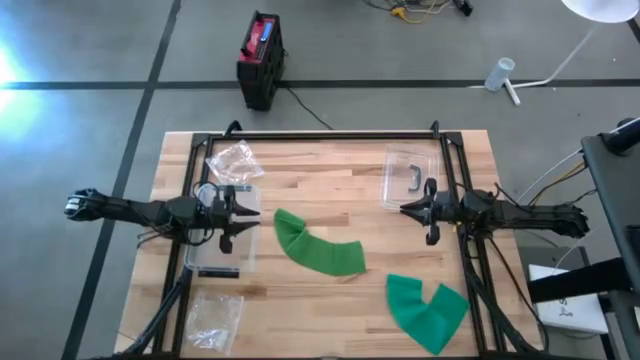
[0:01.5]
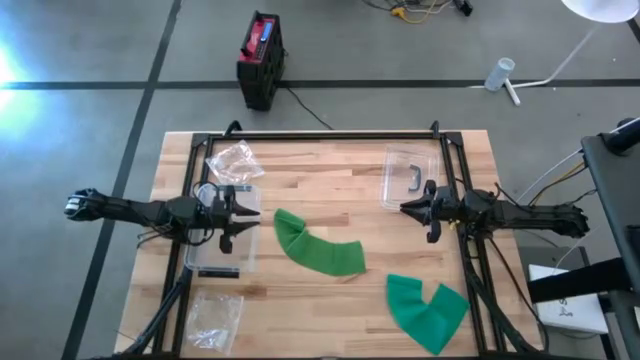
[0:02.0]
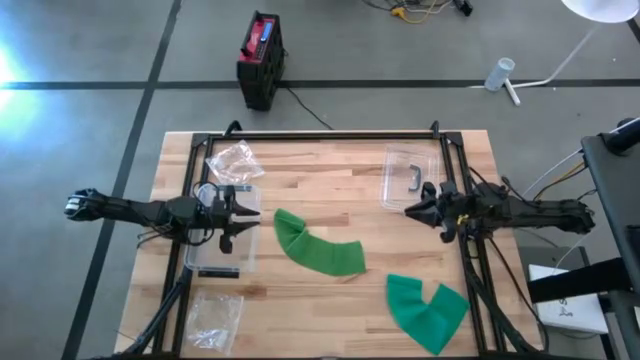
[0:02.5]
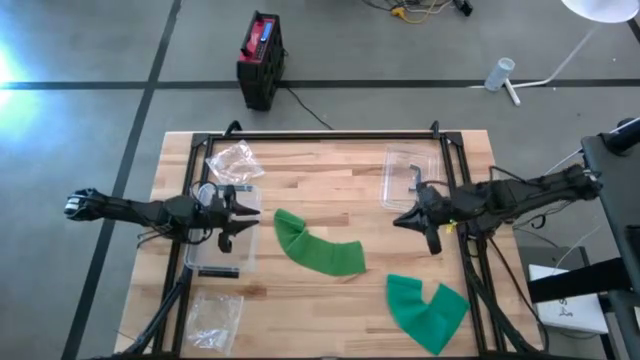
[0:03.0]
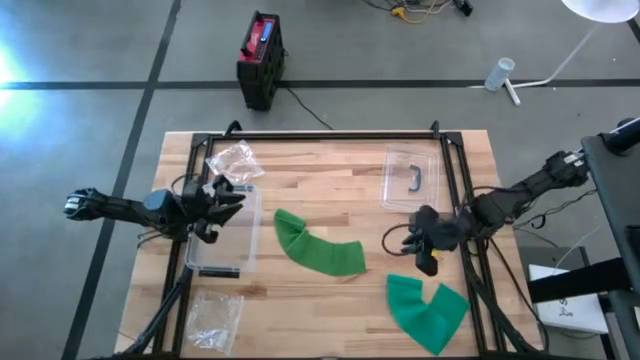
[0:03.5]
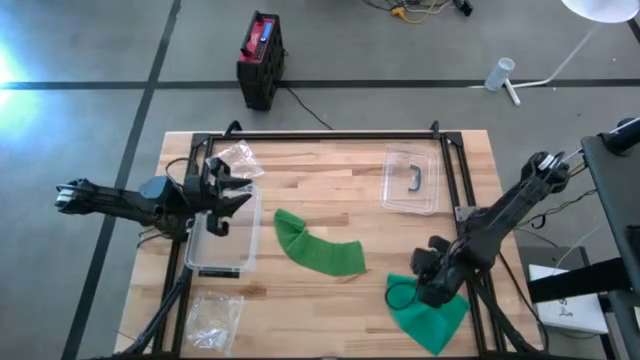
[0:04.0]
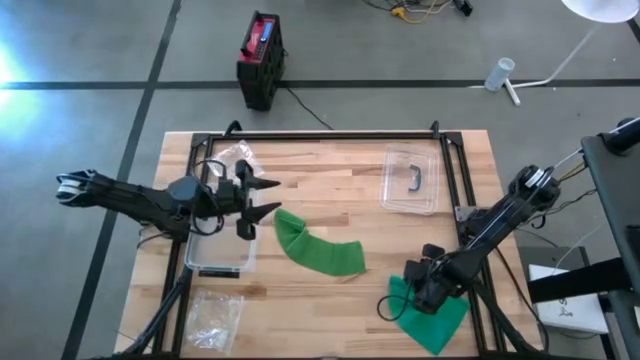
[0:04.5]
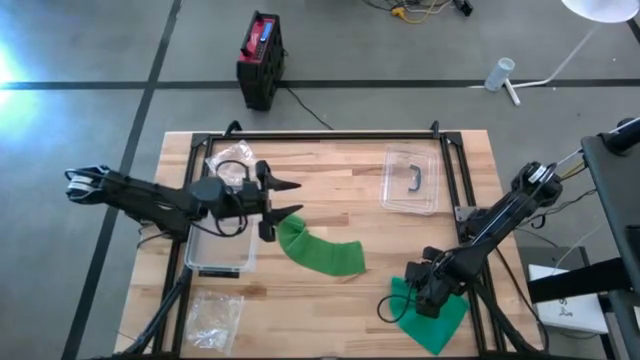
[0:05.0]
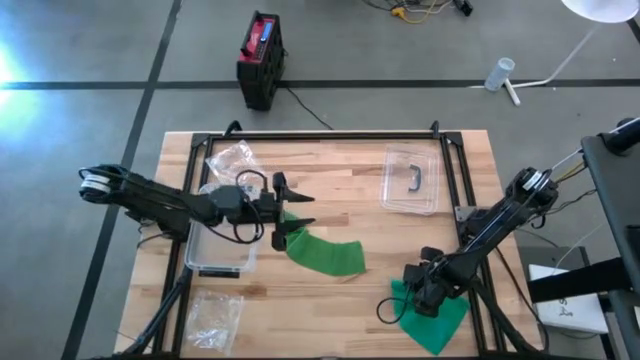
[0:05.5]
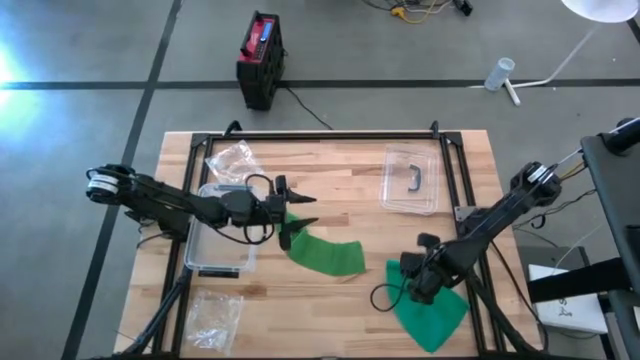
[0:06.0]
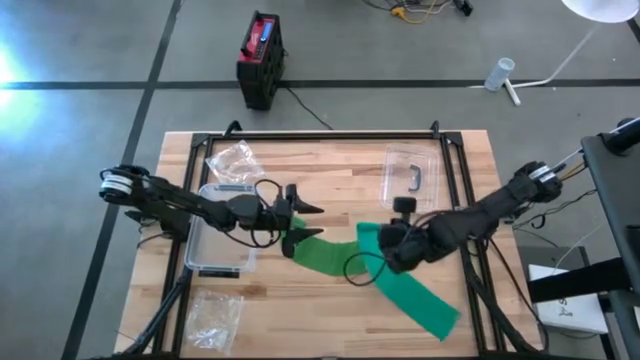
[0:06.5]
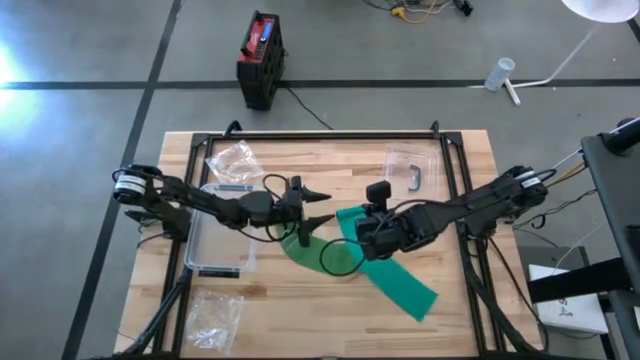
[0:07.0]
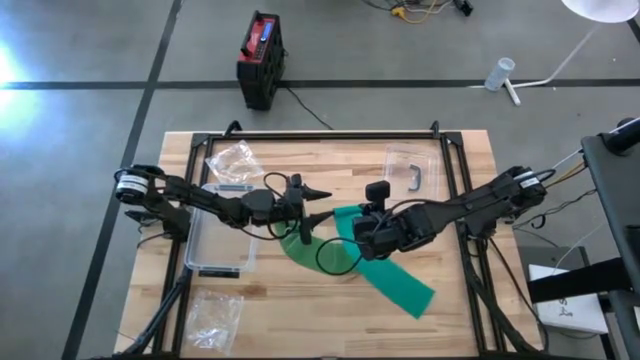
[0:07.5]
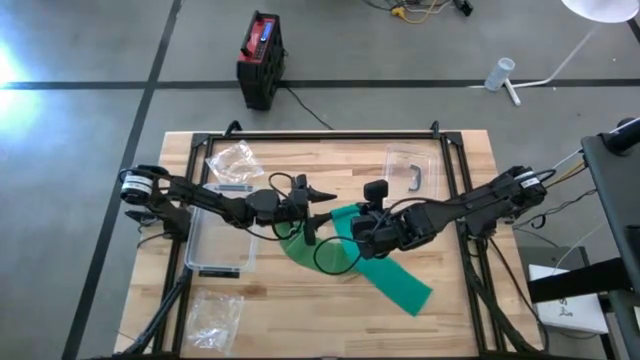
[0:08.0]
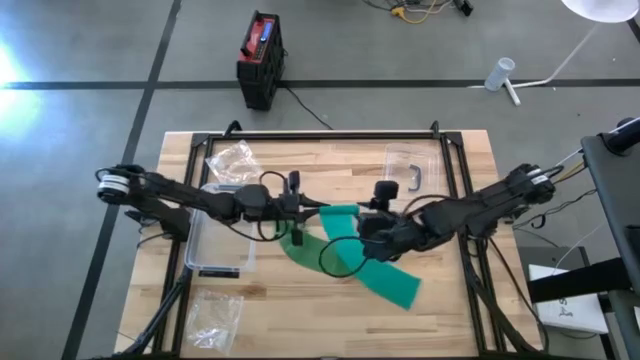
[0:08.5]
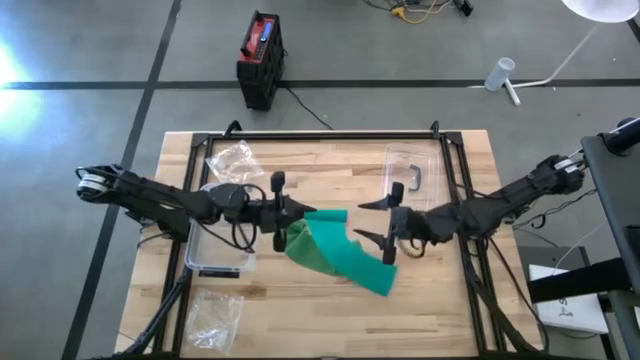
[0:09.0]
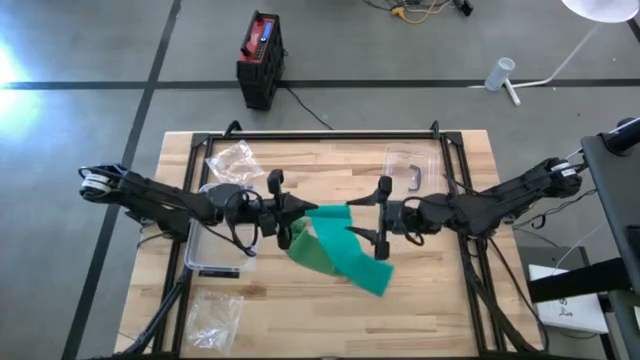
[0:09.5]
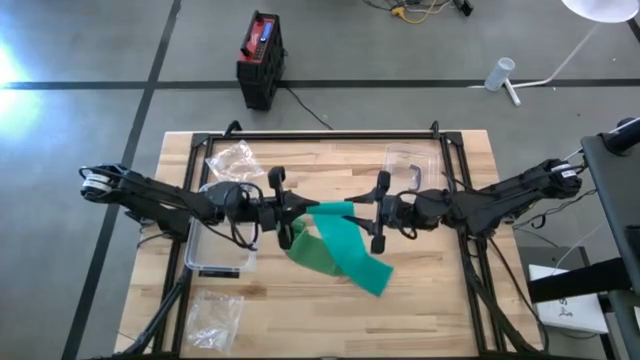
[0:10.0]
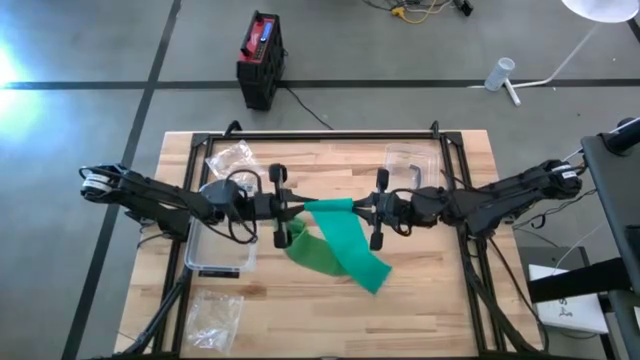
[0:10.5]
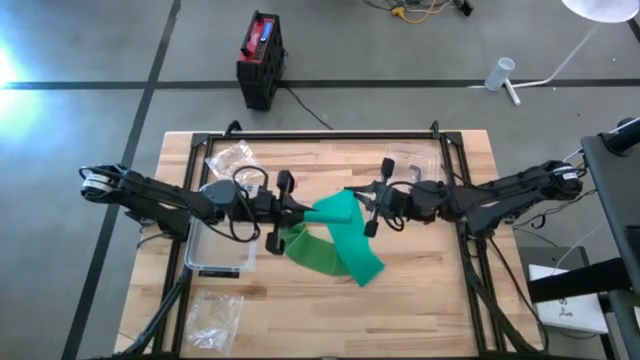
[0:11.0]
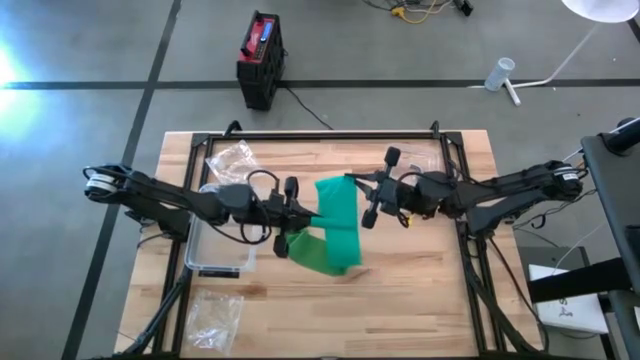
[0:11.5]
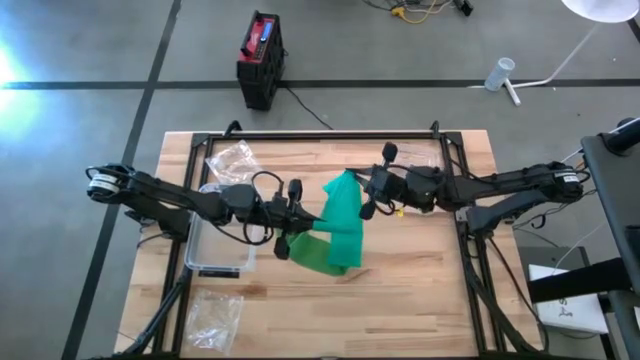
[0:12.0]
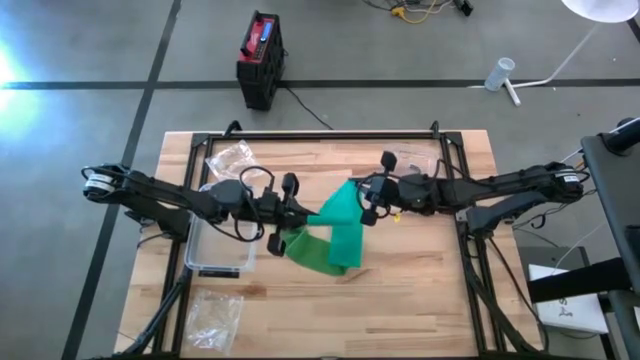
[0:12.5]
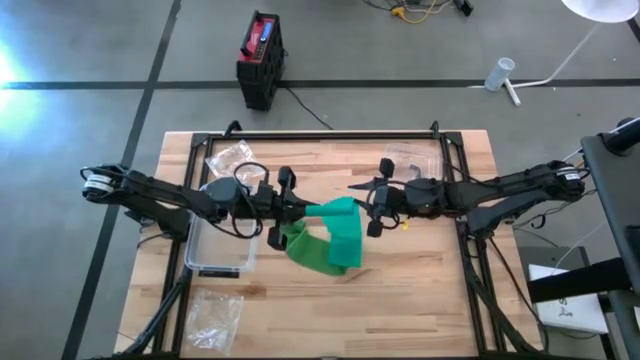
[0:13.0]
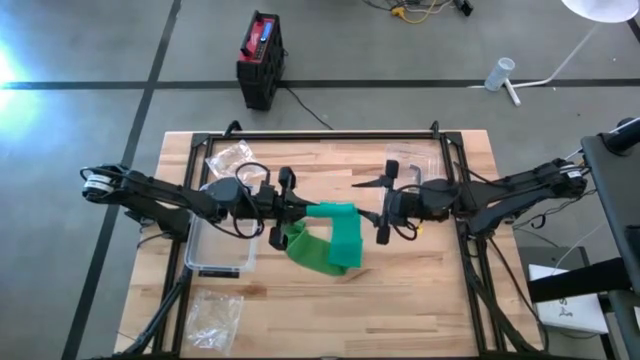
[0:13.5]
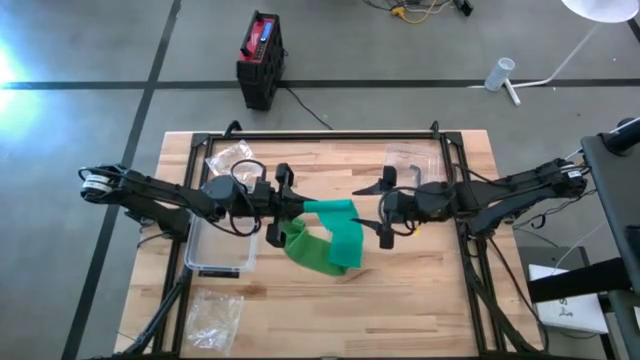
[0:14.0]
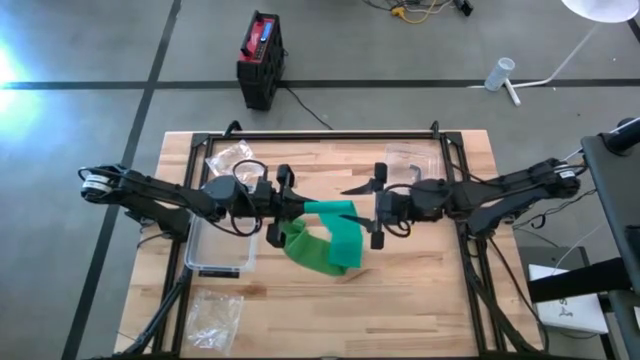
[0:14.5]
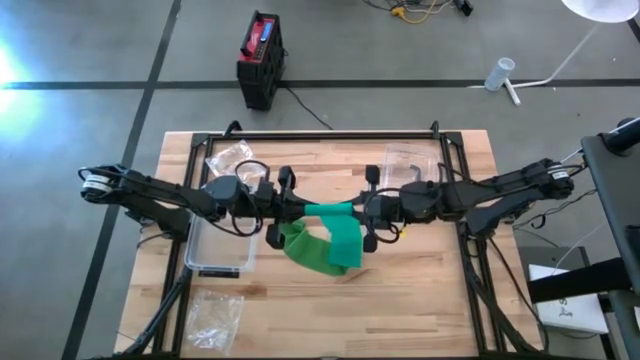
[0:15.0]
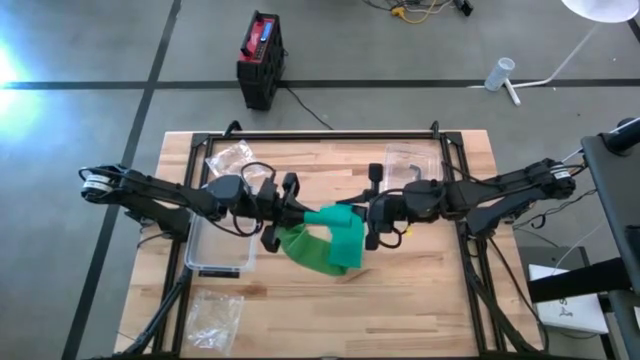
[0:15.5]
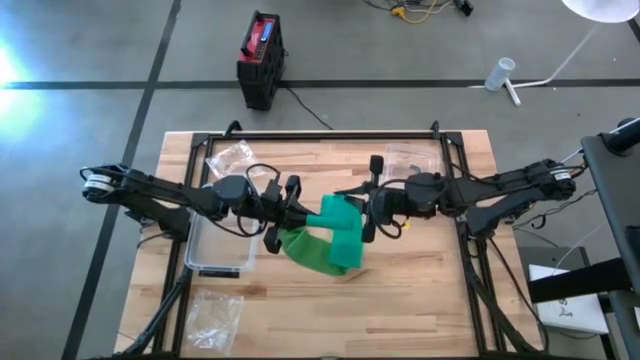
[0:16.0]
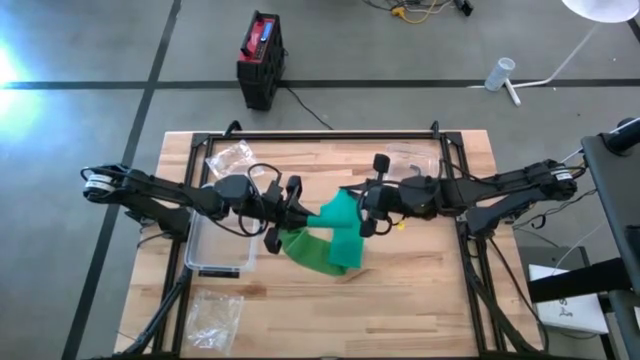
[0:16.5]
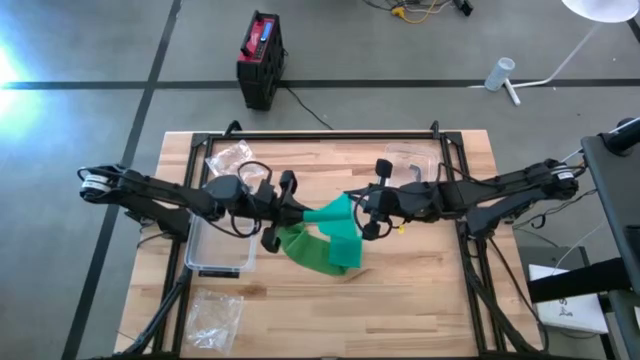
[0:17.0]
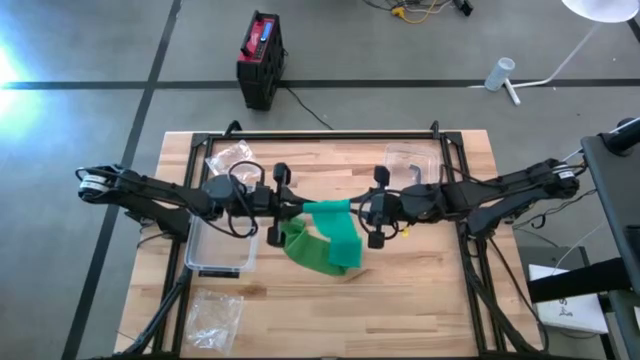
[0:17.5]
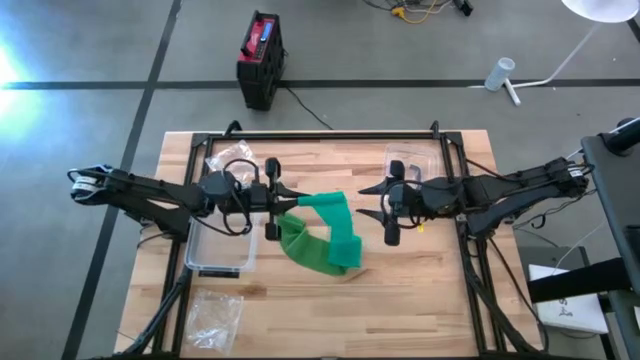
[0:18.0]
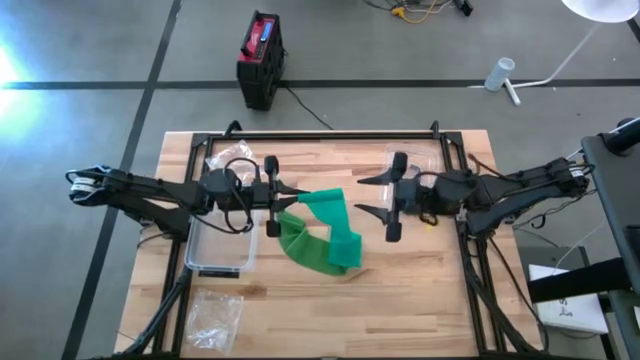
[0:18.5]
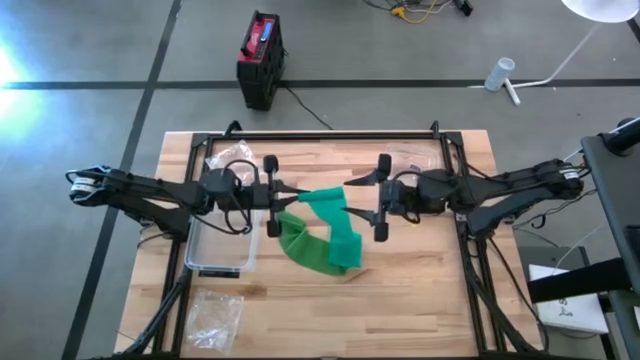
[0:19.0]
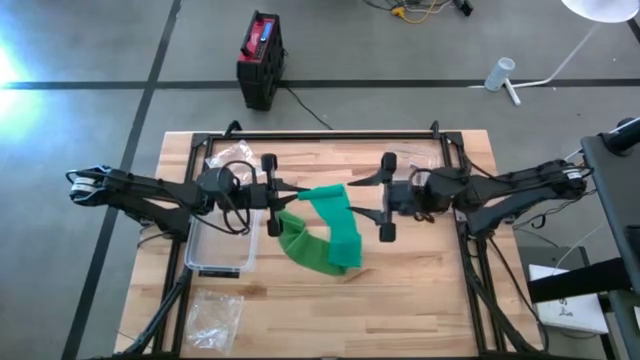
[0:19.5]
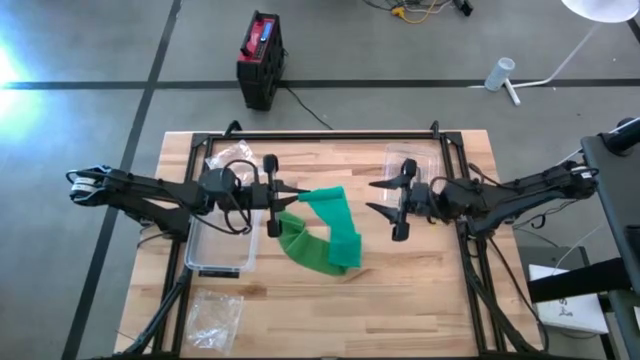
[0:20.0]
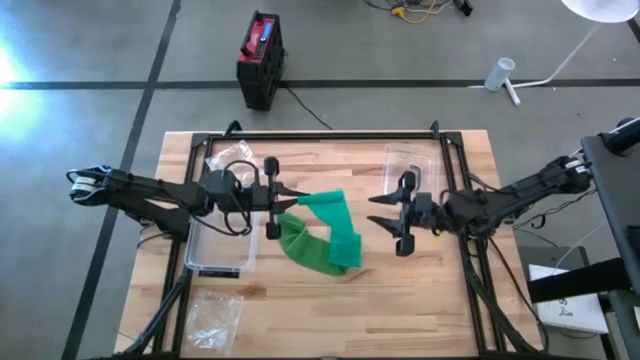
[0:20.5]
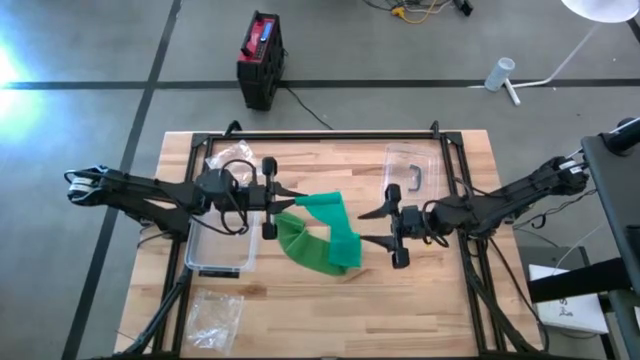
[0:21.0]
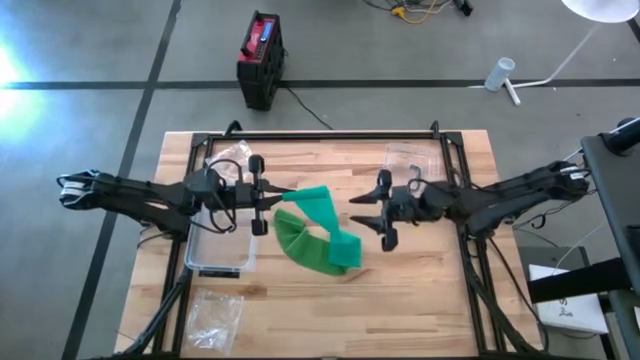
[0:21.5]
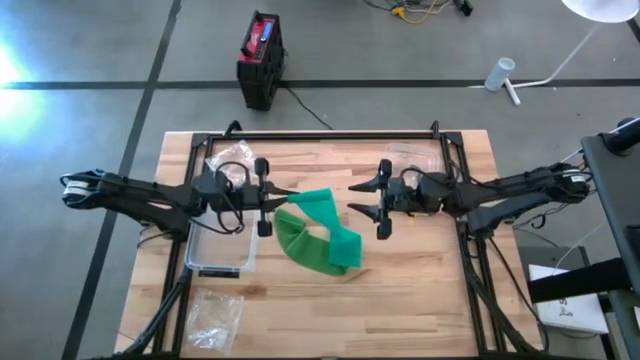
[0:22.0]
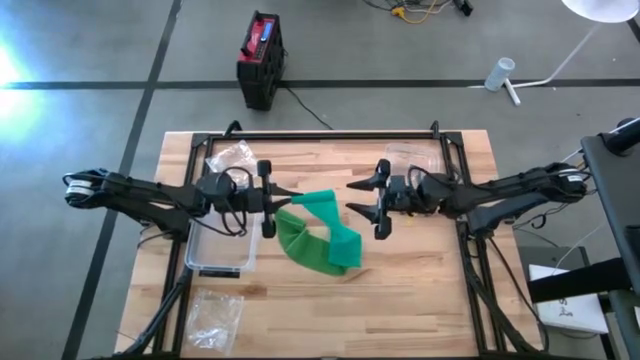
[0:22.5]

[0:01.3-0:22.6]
Task: Roll bandage
Roll the light green bandage
